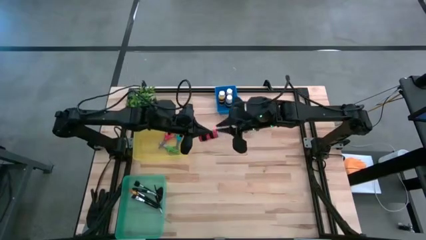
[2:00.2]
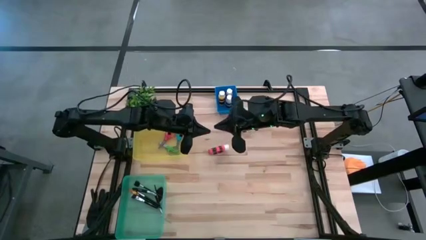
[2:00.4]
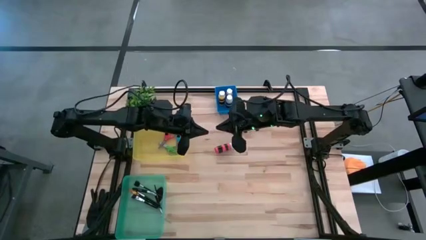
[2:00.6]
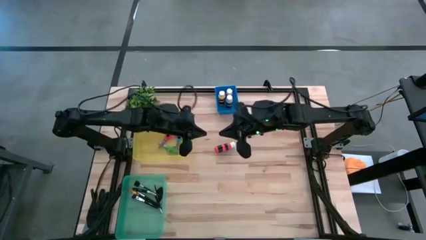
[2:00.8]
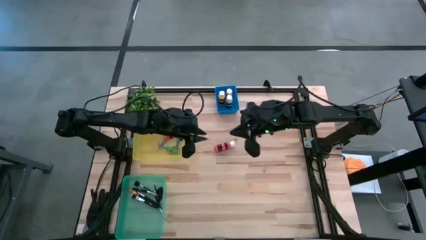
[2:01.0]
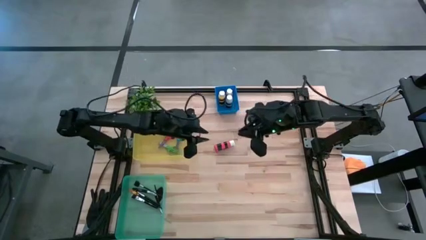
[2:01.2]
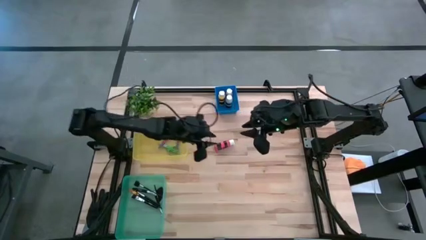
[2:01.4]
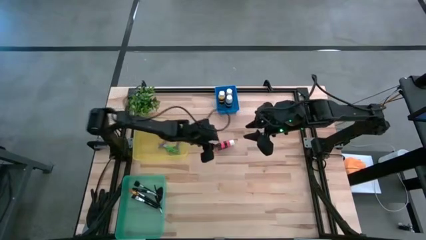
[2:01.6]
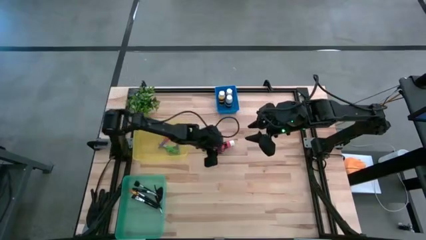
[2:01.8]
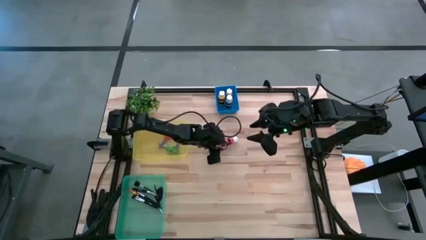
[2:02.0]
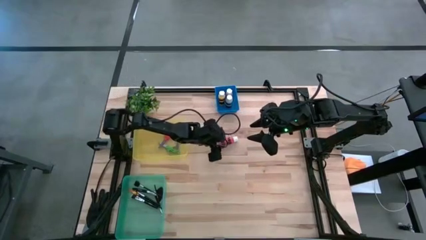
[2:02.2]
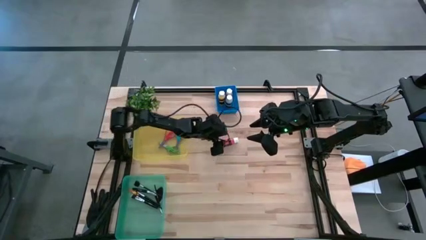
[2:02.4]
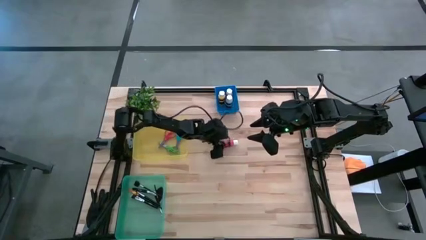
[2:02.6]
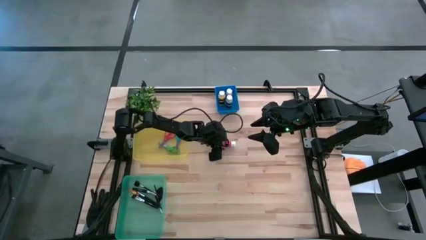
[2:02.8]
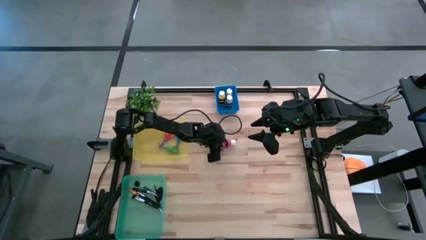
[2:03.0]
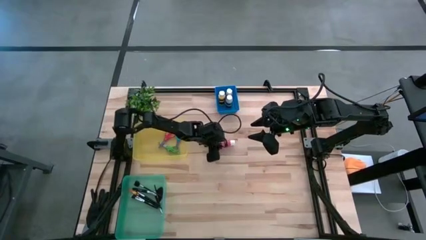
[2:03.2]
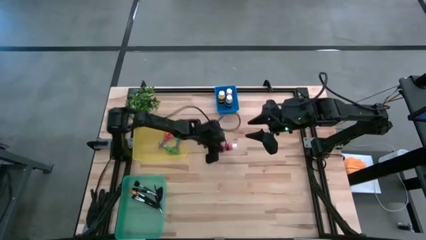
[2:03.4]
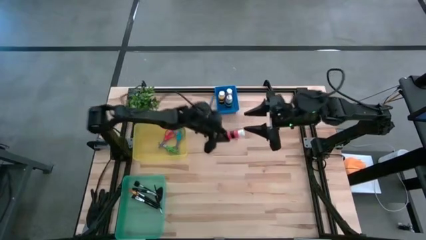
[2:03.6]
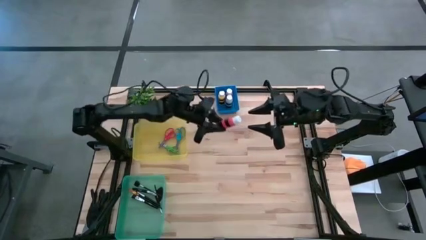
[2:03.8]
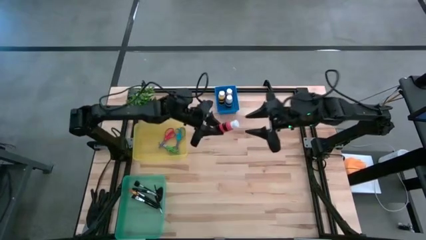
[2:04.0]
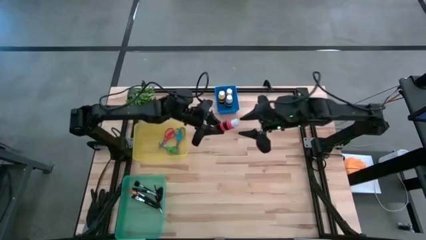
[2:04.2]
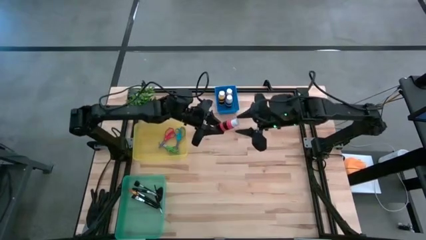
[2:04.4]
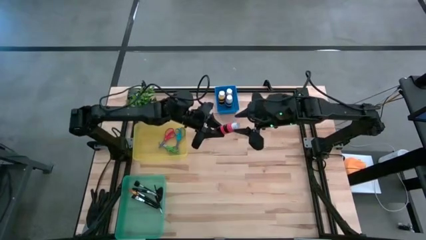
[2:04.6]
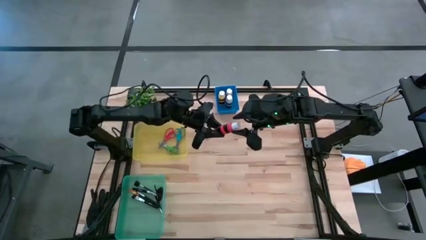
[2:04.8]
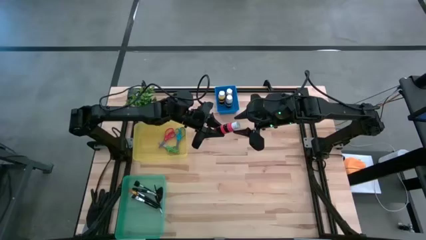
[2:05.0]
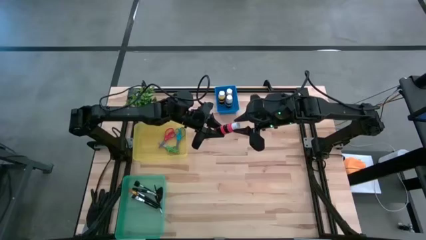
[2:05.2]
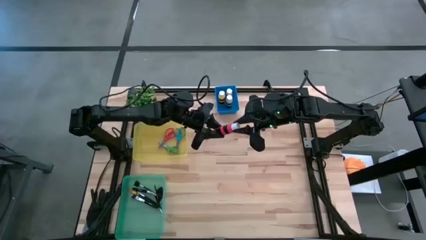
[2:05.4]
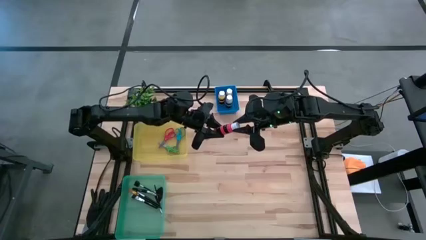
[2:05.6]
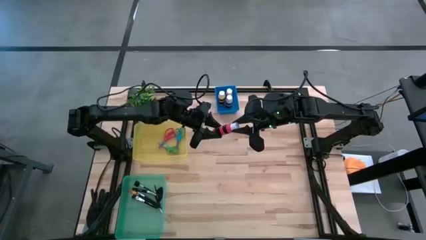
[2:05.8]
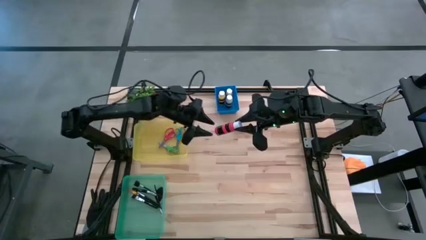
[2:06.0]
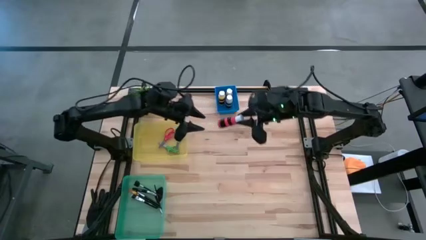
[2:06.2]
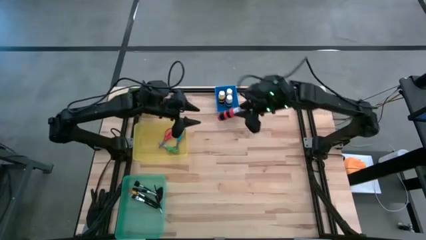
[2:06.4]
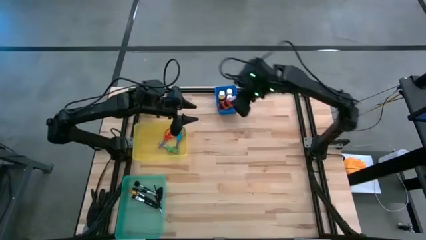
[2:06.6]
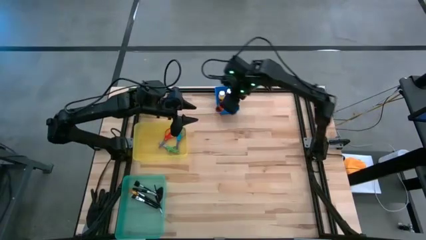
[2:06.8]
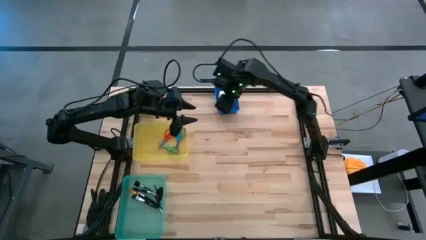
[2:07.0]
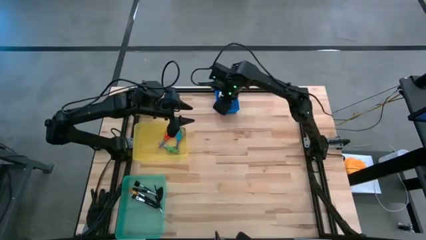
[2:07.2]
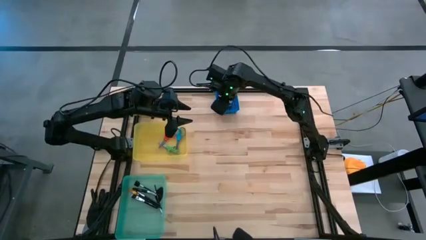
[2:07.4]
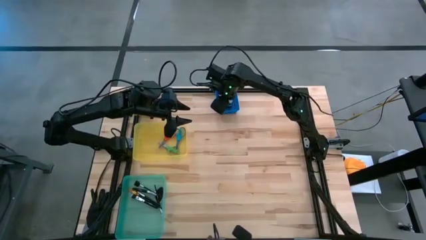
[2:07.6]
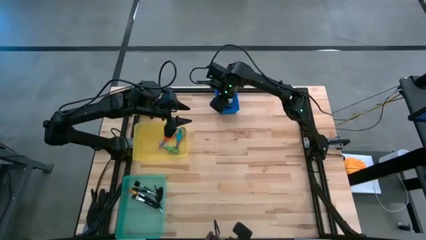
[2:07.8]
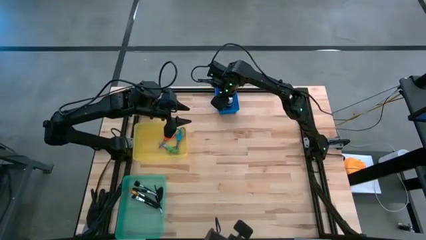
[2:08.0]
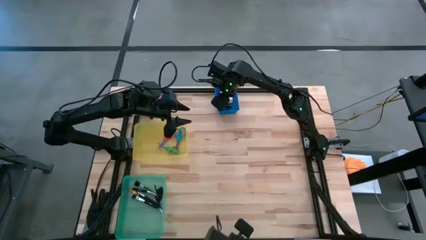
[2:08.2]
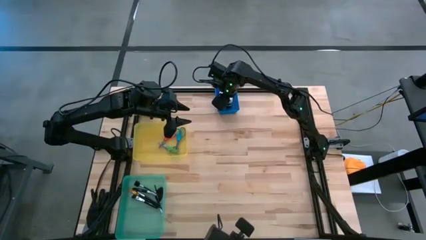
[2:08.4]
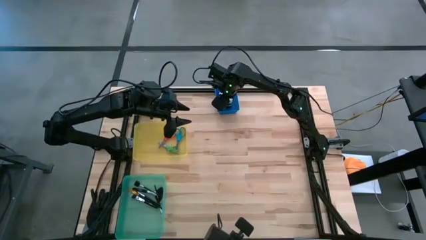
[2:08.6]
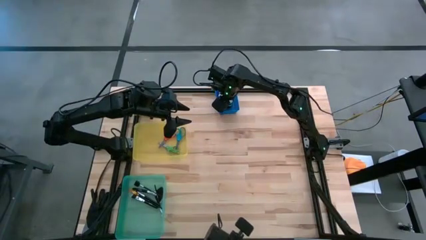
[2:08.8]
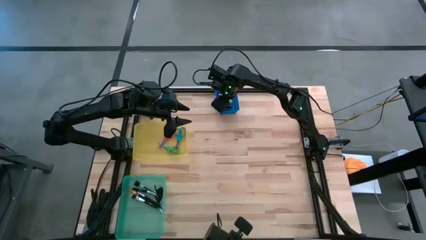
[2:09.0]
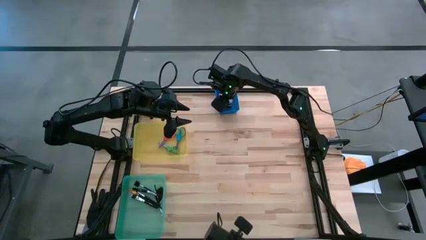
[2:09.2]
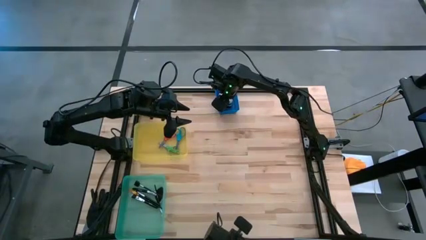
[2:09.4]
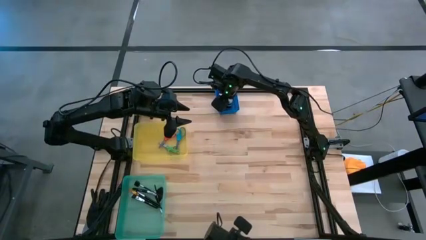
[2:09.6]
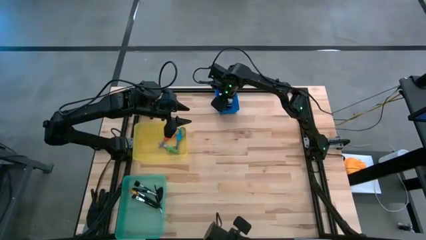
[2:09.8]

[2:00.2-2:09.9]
Task: Pick & Place Paint Supplies
Put the orange paint bottle into the blue bin

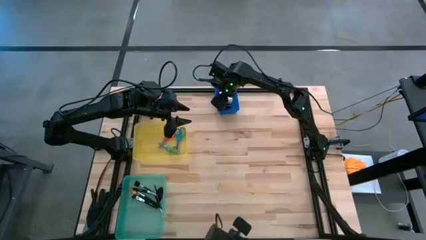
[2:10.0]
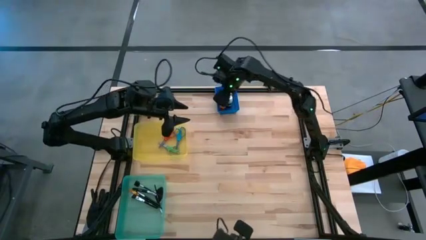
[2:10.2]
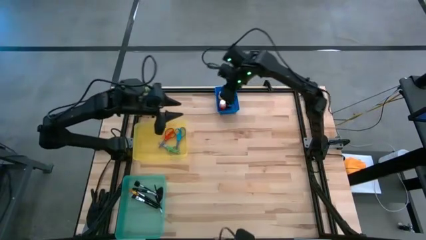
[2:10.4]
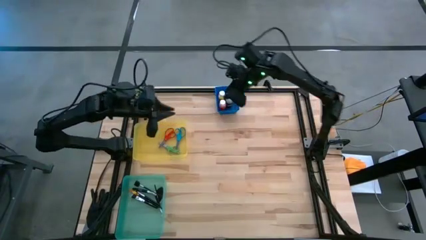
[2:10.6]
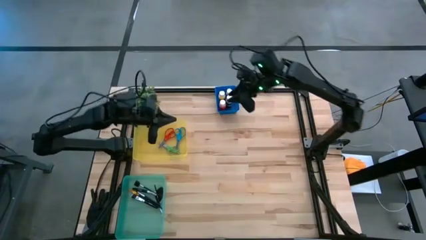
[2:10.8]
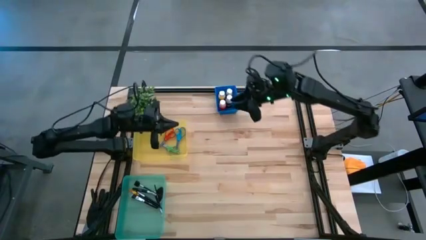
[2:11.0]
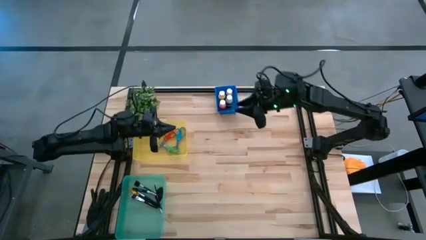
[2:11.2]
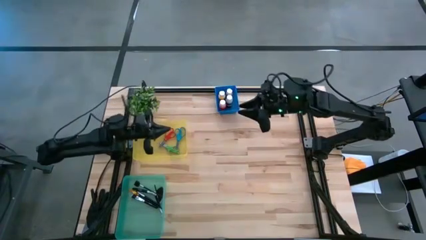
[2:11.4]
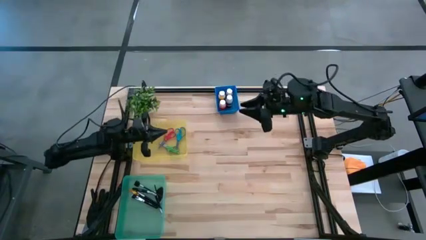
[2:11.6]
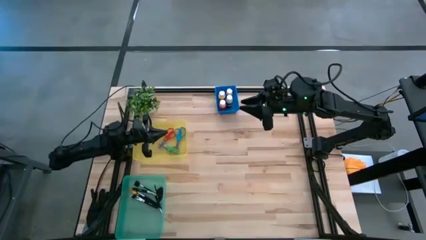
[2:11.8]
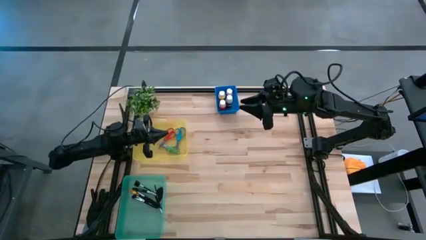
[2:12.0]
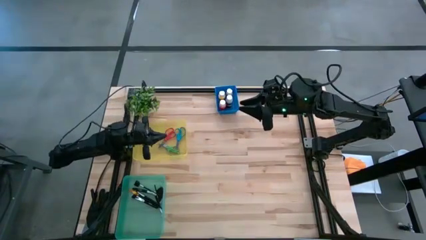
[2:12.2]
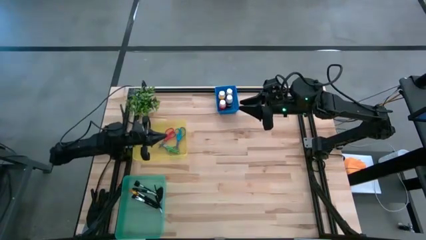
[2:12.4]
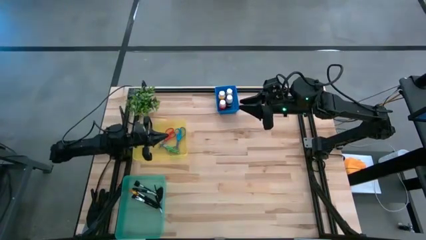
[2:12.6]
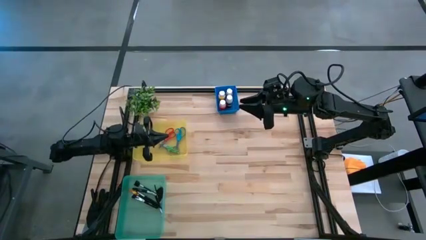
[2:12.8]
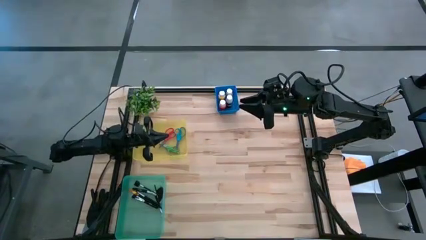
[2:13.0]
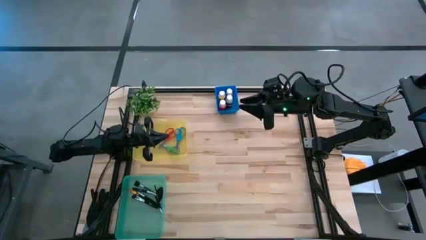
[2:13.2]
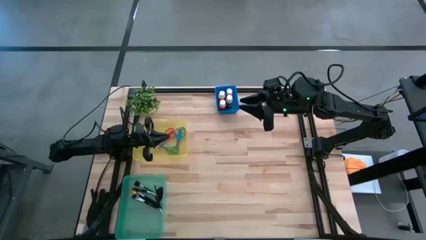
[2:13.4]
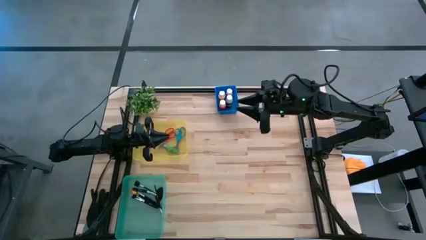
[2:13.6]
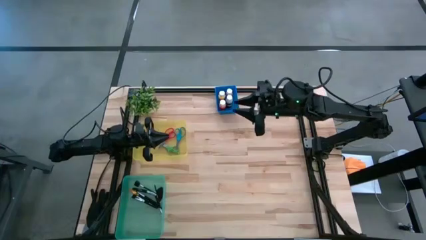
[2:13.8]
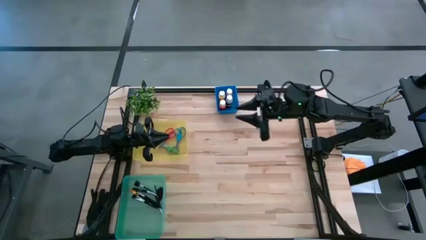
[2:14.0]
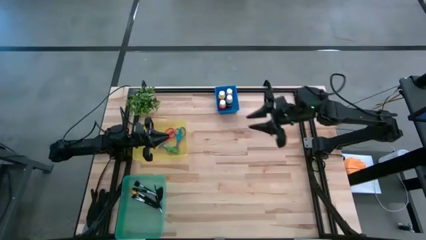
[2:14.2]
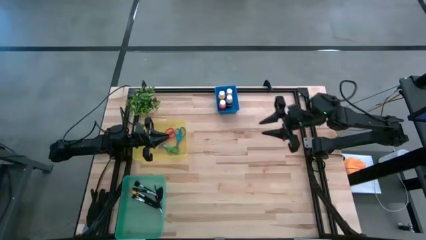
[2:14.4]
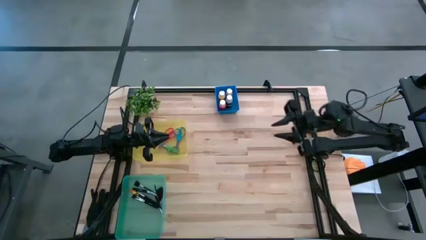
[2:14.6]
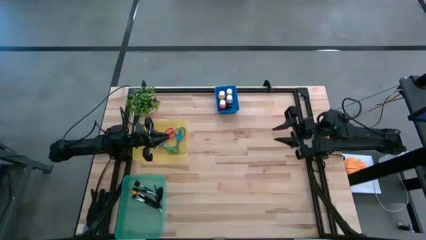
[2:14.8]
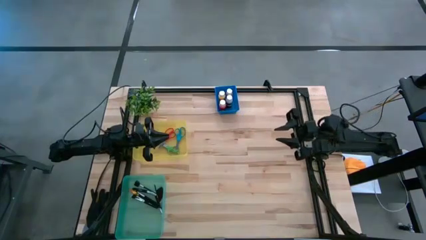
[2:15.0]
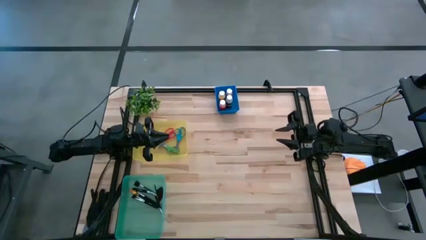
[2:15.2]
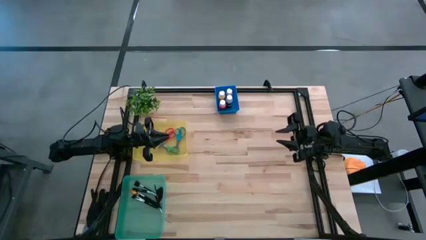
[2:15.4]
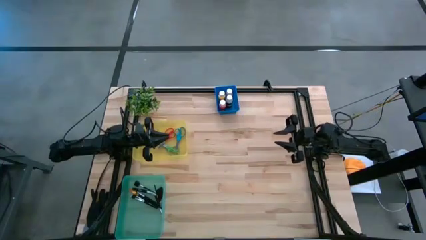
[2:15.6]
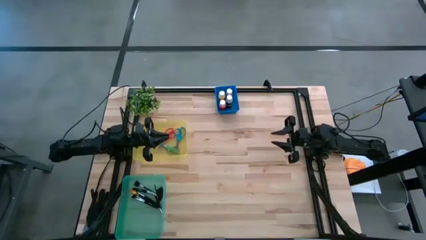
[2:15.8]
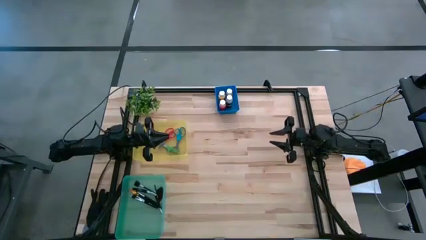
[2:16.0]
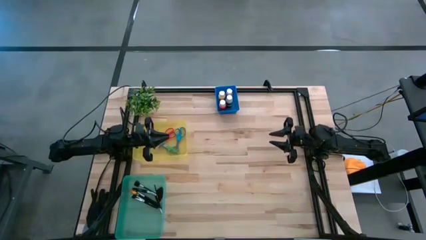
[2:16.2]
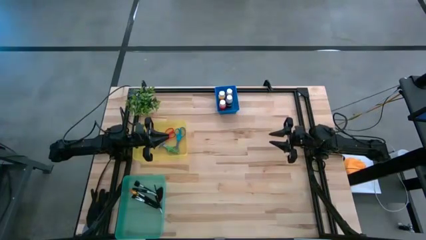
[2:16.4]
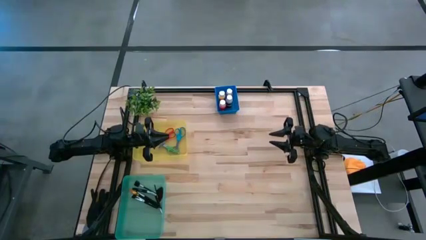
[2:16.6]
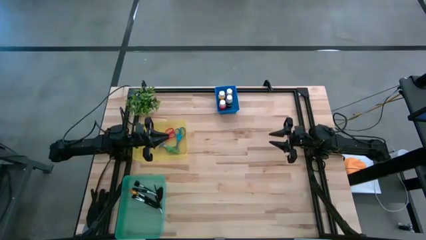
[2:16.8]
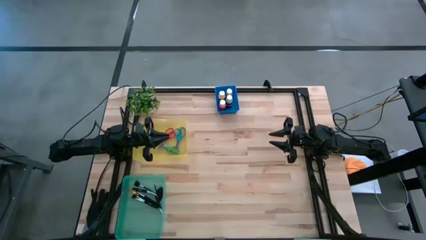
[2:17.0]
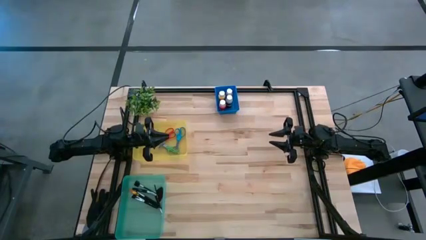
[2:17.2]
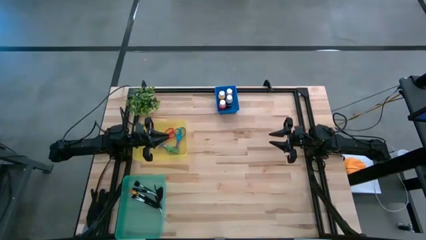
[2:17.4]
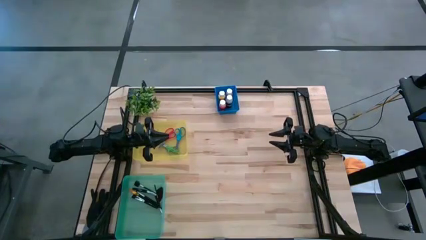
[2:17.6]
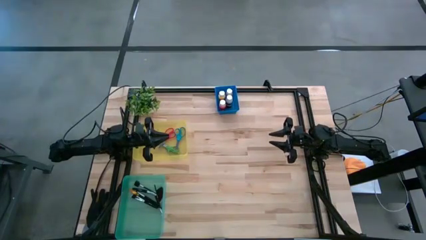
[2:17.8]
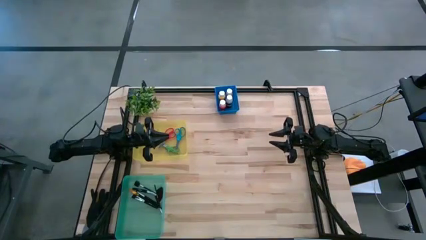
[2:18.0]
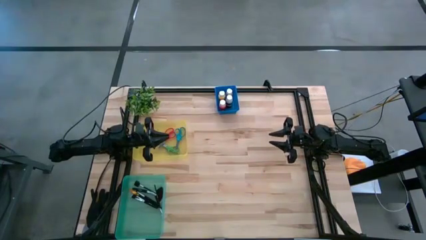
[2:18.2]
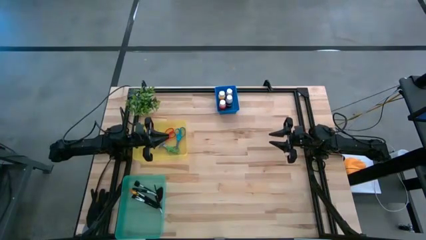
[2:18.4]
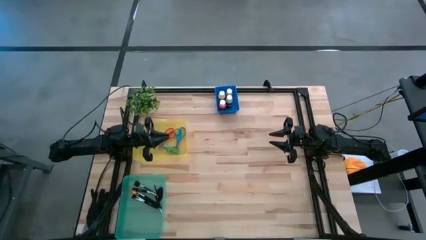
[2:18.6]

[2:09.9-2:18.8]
Return to Home Position
